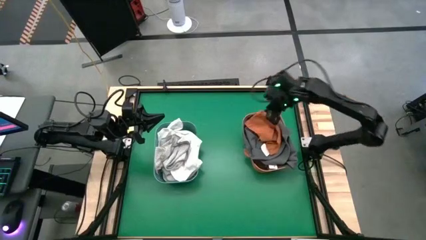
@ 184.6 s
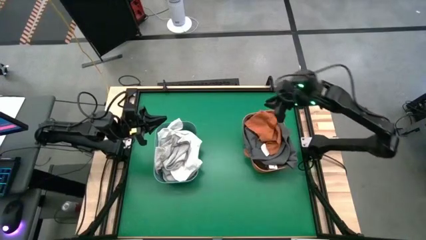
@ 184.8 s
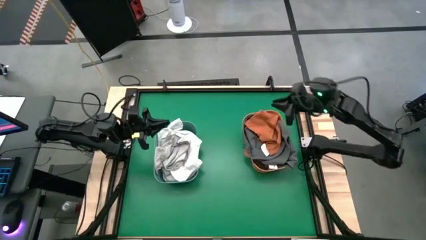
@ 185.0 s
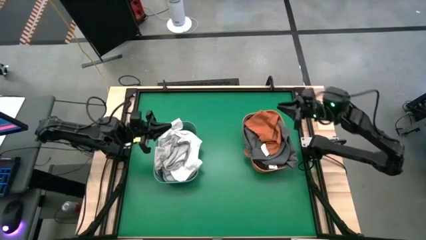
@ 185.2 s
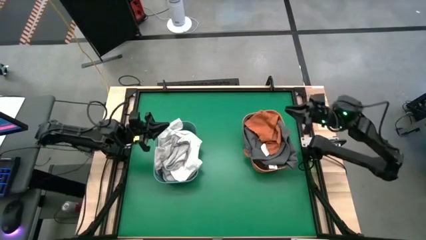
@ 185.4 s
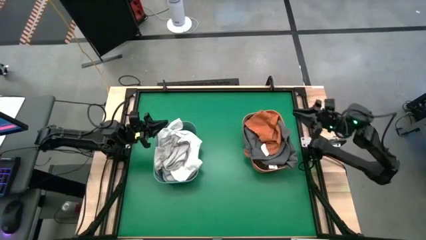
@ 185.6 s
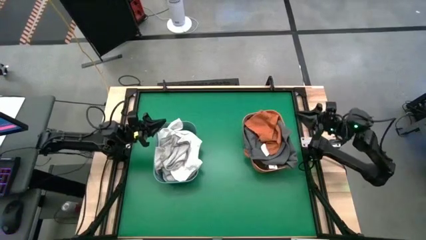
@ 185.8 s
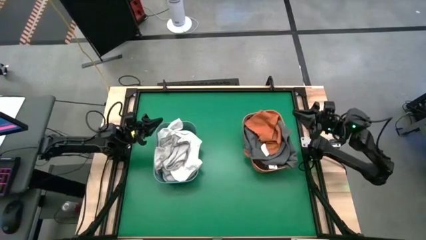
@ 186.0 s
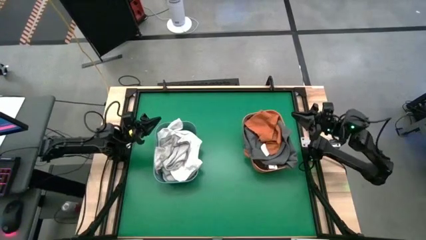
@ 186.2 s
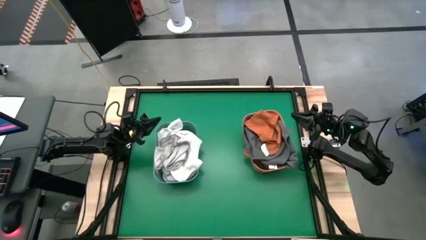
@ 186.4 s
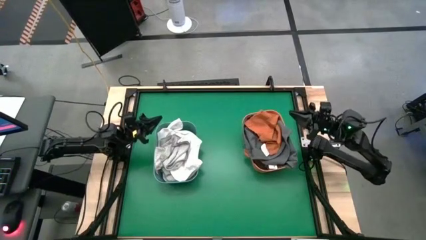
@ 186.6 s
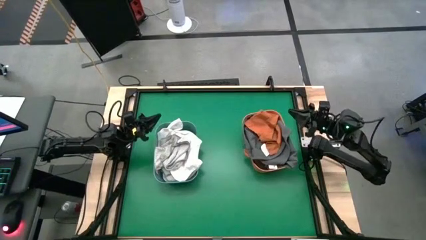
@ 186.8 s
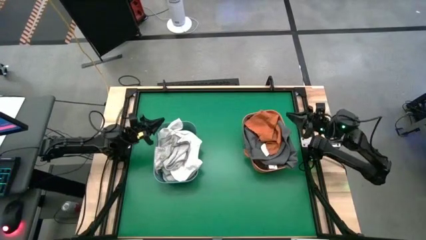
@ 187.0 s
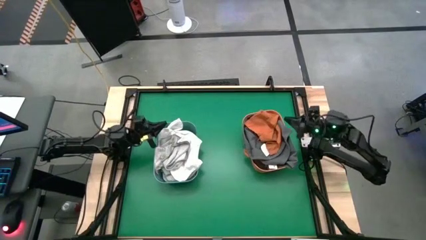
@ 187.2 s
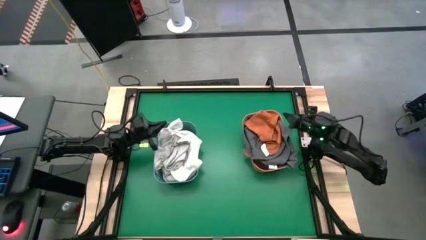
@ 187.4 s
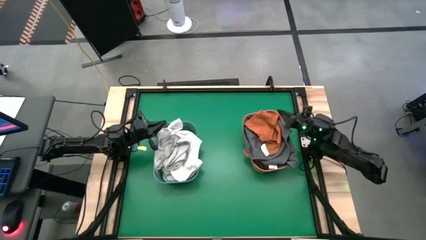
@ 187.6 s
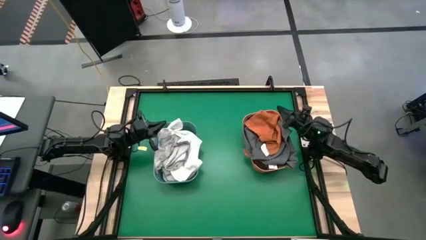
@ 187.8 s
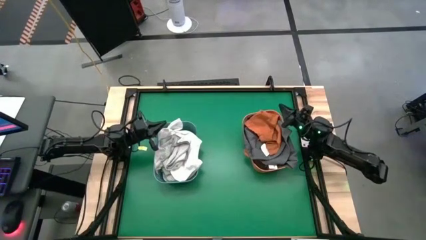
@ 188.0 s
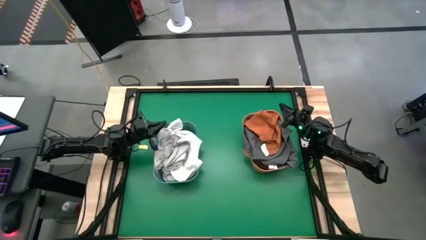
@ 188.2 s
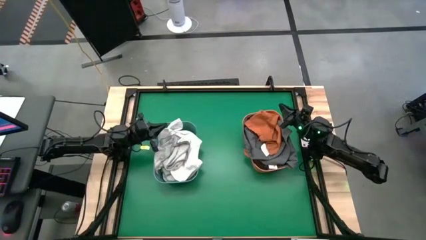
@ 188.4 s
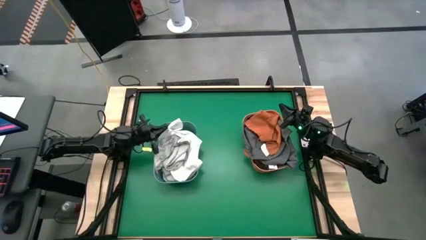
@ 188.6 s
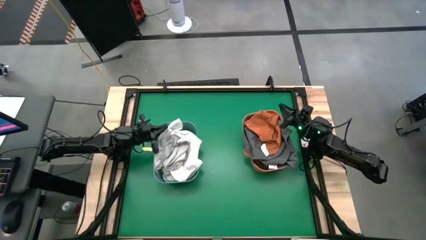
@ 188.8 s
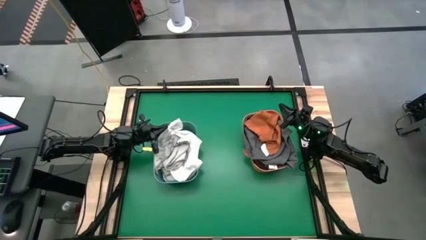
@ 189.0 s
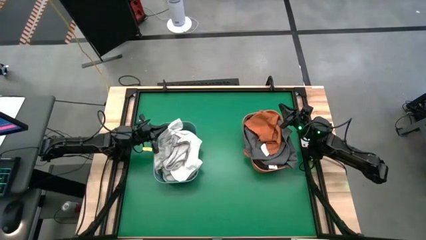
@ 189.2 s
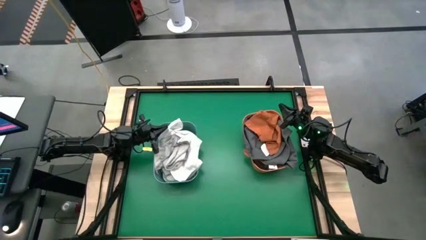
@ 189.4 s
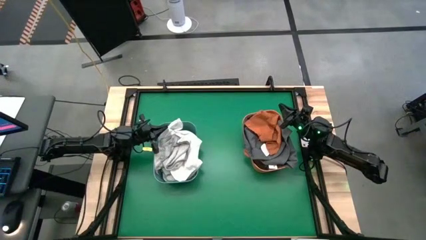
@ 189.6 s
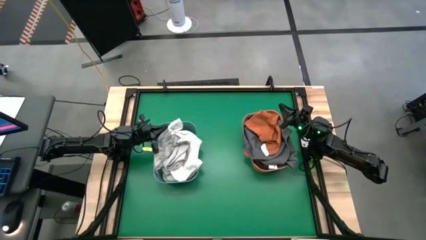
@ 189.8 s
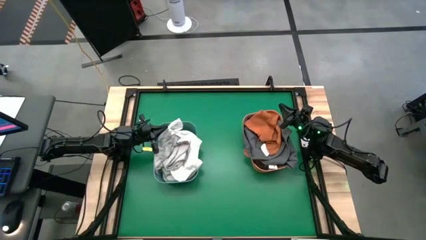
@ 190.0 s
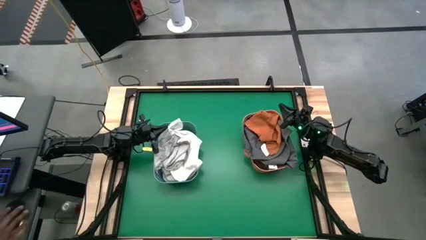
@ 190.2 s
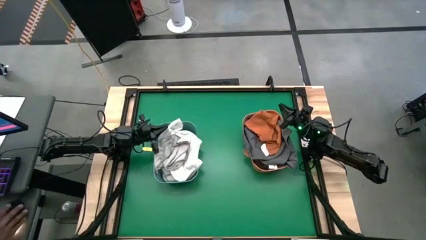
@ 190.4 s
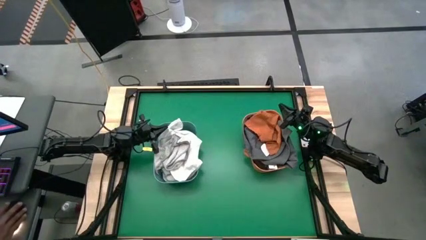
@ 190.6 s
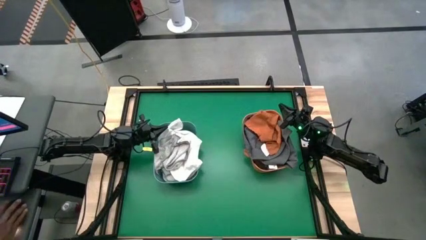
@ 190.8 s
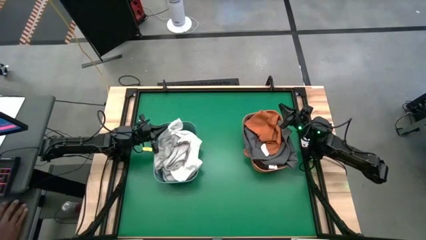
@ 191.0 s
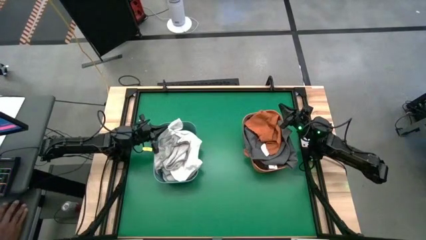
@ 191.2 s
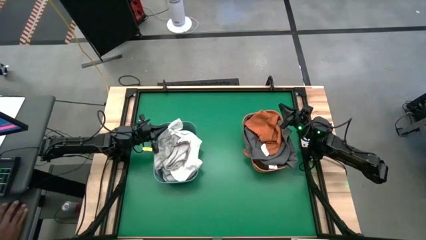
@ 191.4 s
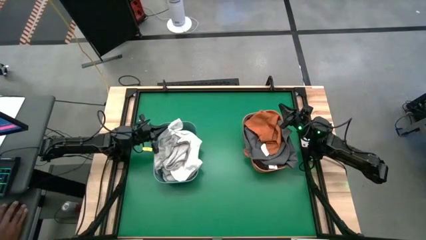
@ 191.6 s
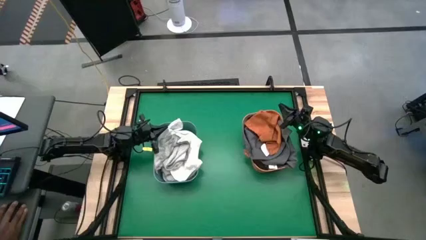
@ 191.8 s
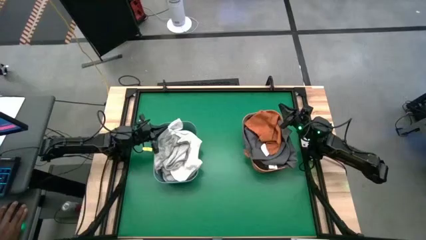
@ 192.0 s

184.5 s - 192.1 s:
Task: Sort towels by color in basket
Return to Home Position

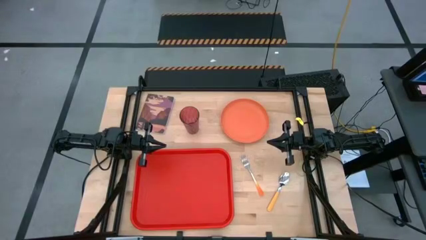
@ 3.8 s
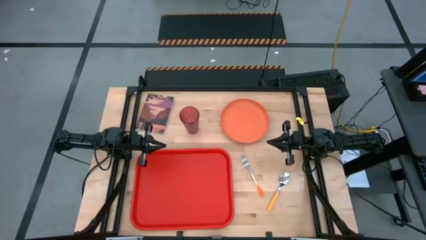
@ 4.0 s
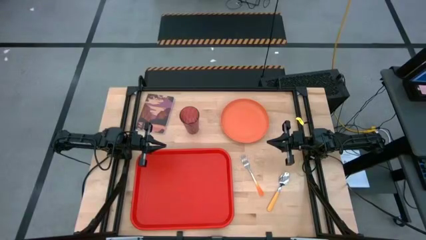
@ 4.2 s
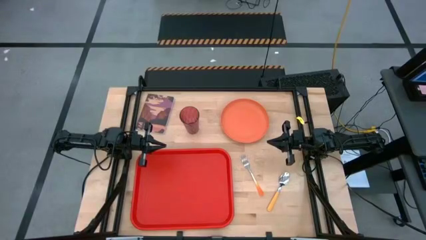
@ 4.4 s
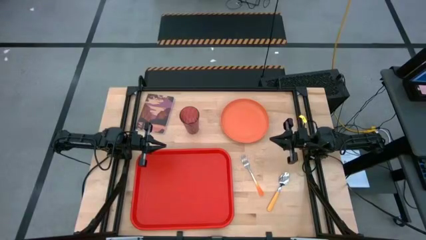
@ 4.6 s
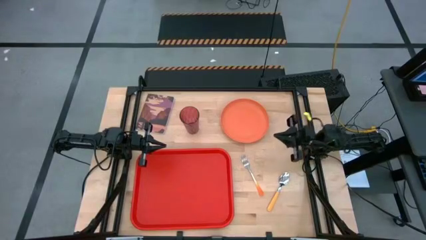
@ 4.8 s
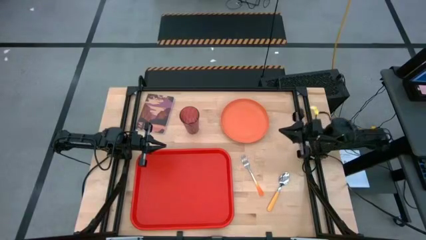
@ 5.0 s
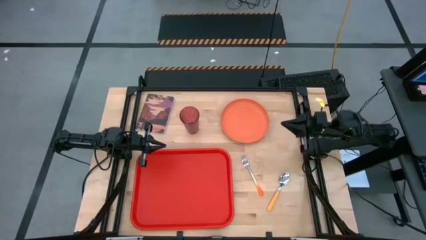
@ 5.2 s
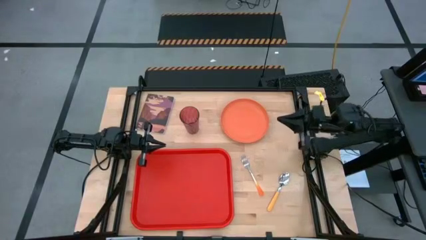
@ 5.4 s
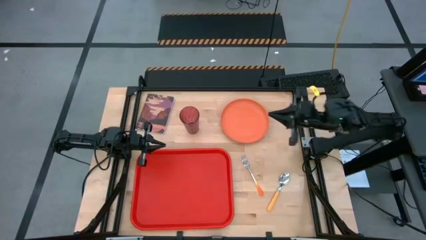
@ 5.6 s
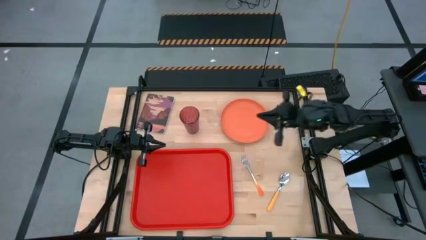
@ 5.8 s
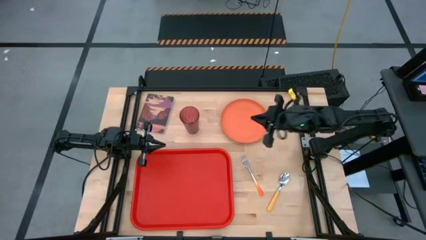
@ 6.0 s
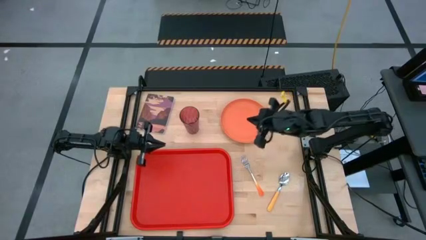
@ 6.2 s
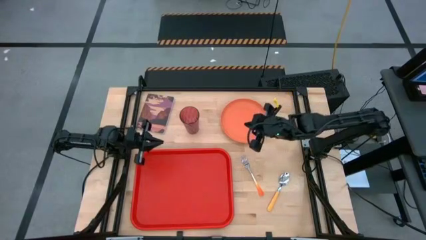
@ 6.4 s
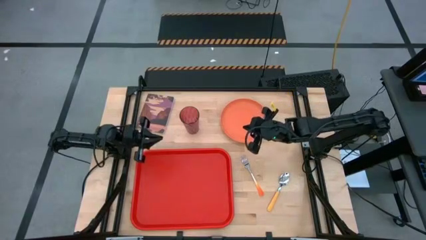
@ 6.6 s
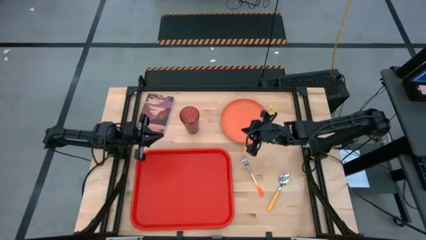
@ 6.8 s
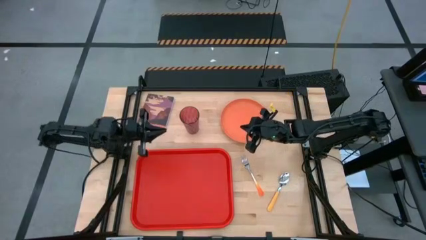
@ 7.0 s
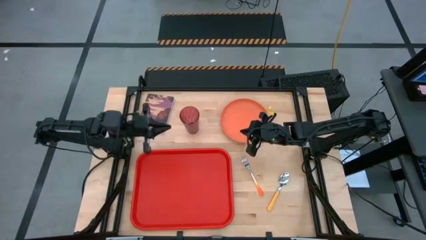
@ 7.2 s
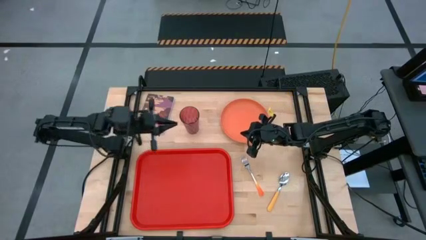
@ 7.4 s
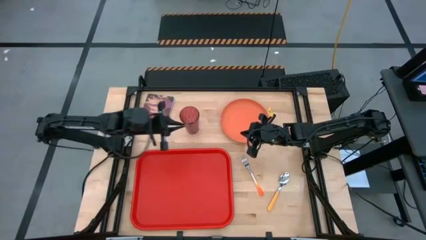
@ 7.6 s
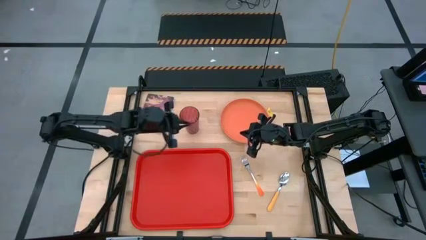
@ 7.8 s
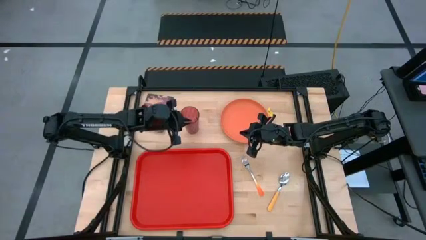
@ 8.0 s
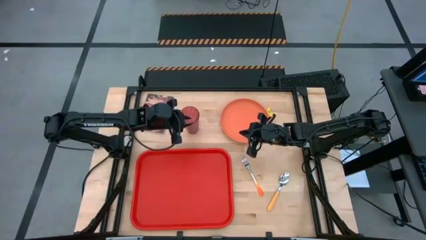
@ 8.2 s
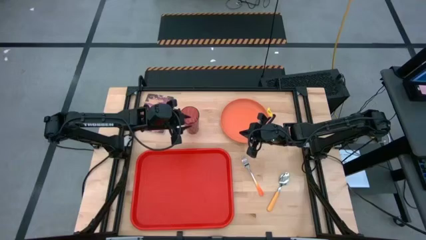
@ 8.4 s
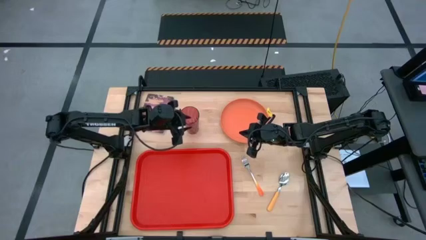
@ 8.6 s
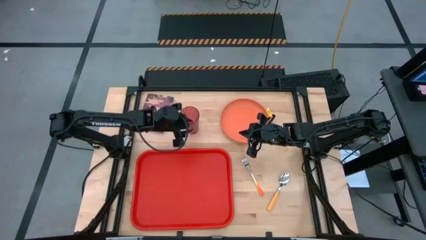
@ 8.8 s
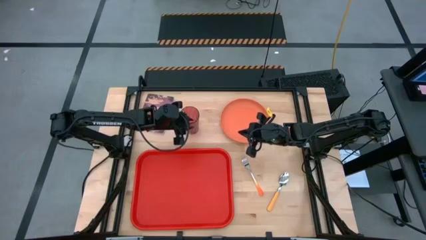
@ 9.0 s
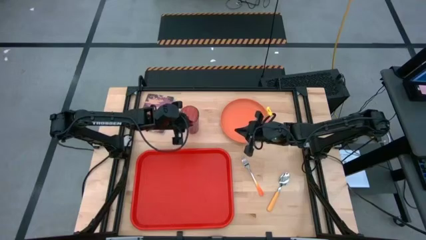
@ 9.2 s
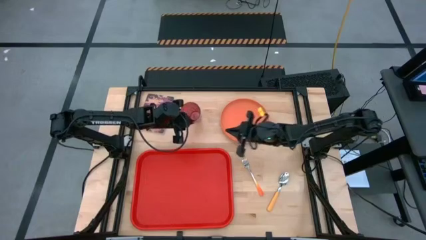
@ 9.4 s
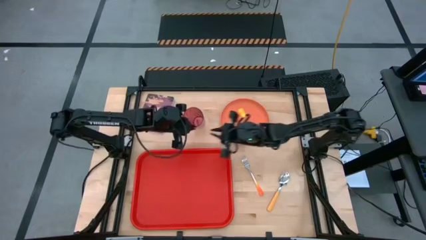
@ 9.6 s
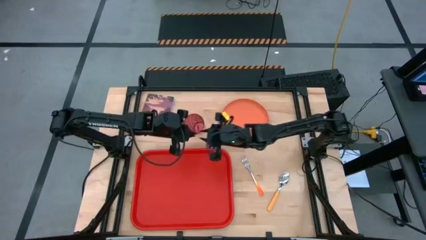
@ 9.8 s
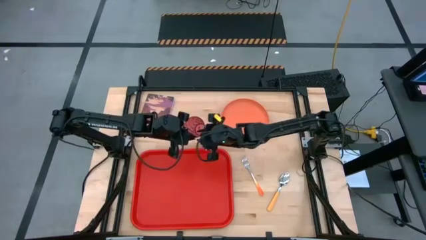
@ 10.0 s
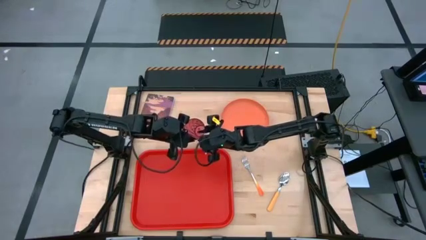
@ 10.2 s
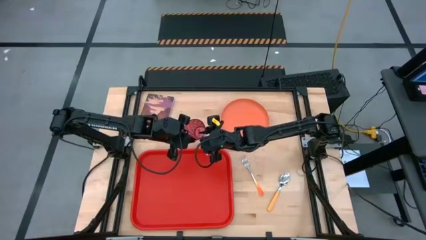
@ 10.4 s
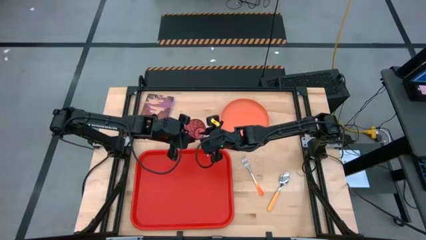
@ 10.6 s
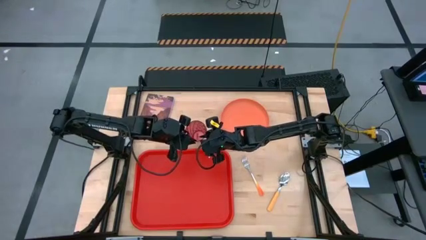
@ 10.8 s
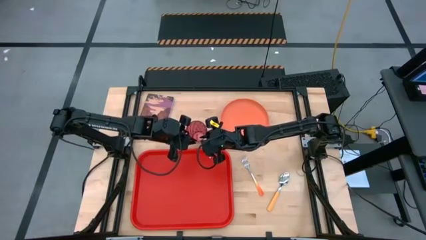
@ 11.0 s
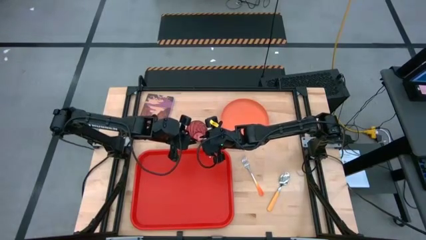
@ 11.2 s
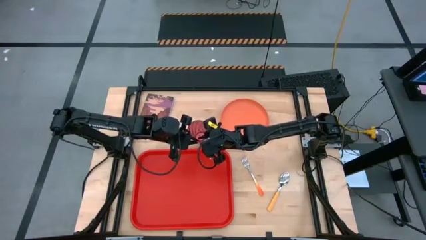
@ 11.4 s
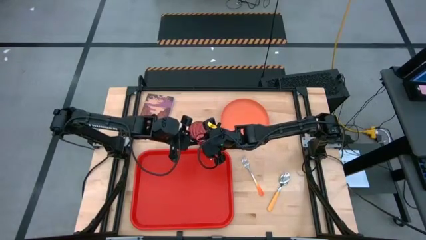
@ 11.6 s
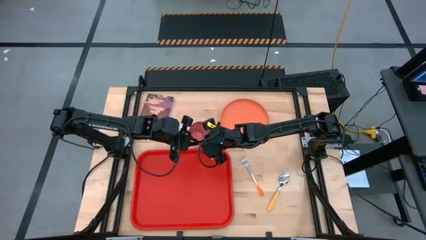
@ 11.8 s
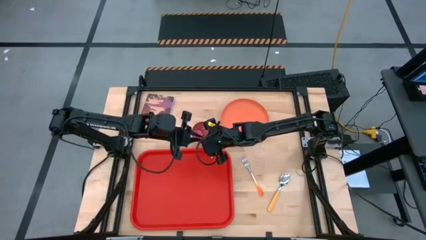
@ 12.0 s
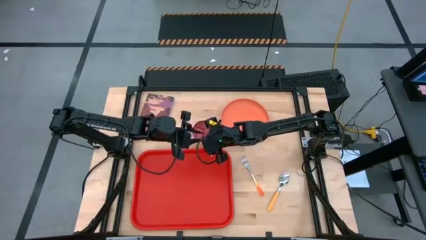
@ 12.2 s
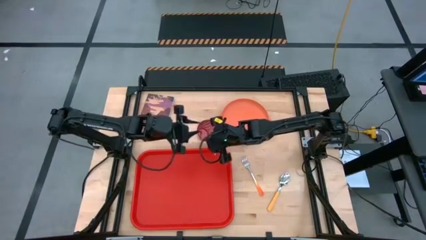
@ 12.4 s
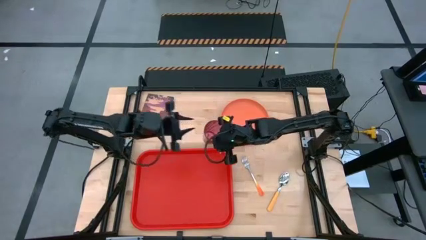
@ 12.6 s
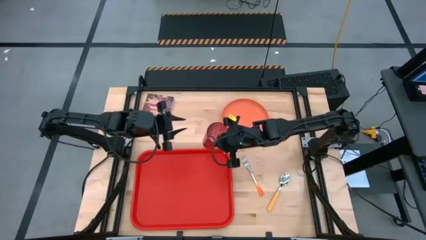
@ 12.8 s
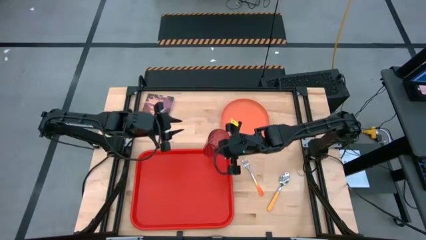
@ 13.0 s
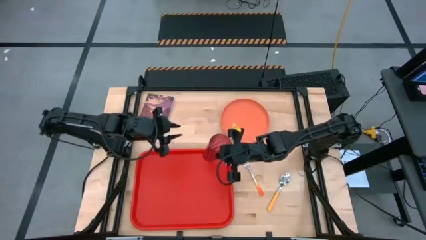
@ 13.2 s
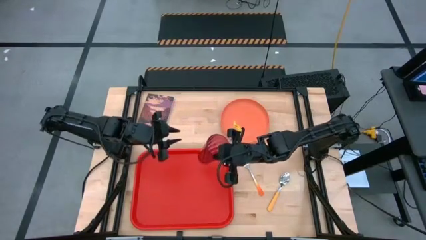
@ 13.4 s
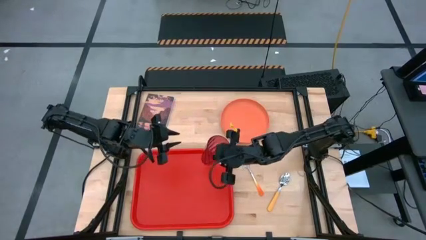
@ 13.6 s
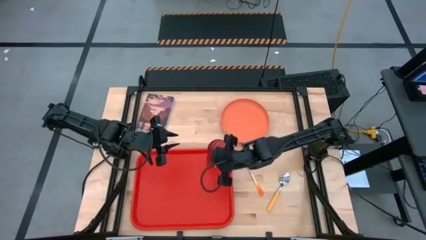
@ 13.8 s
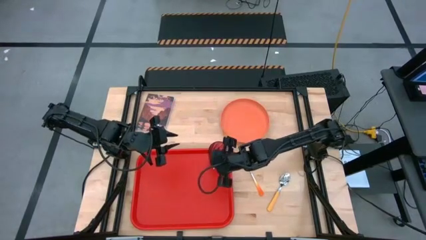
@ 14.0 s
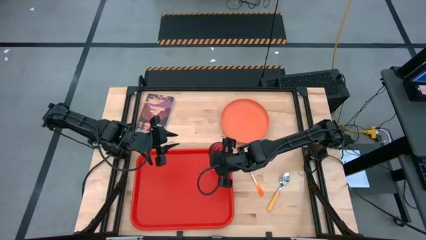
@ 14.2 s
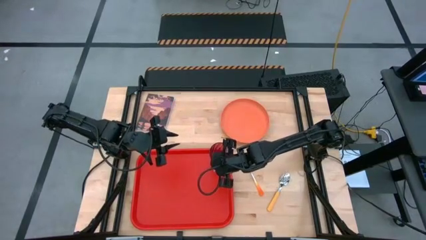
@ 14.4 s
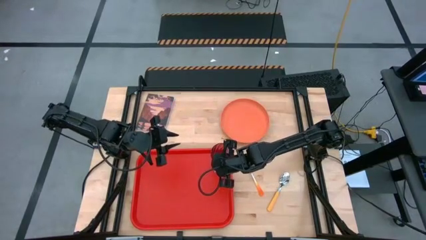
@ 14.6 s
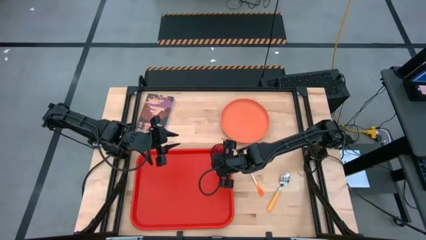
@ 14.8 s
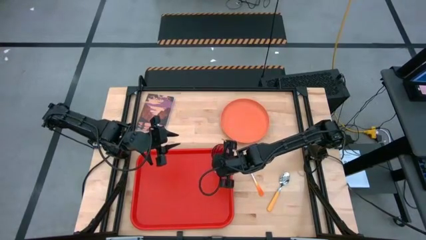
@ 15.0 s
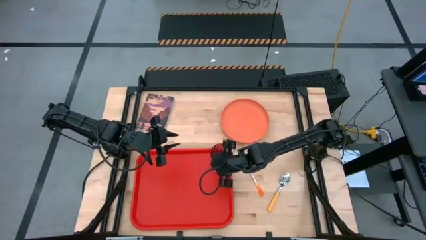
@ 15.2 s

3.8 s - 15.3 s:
Task: Pick and place plate/cup/fork/spoon on tray
Put the red cup on the red serving tray
